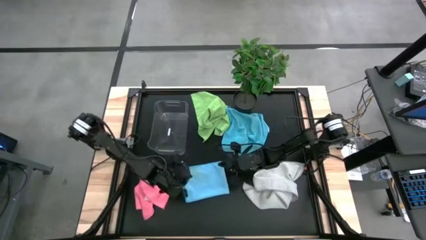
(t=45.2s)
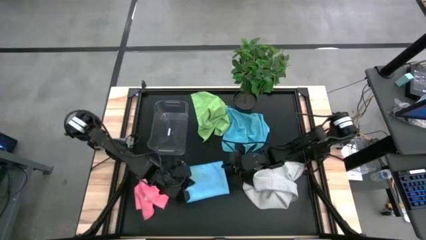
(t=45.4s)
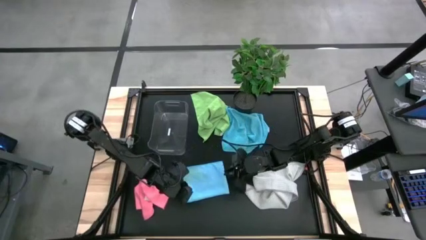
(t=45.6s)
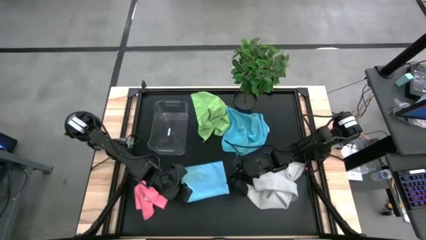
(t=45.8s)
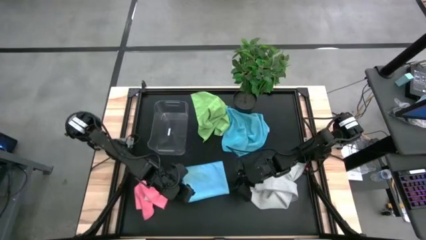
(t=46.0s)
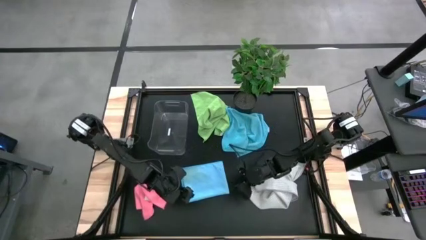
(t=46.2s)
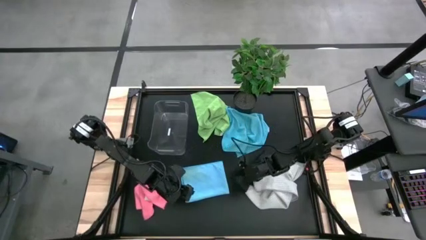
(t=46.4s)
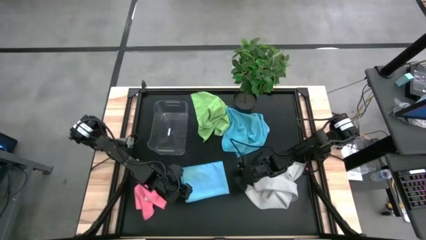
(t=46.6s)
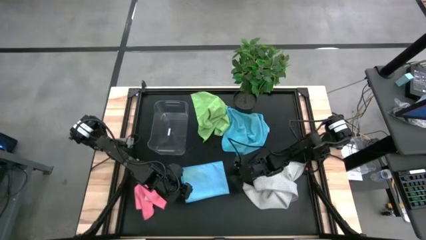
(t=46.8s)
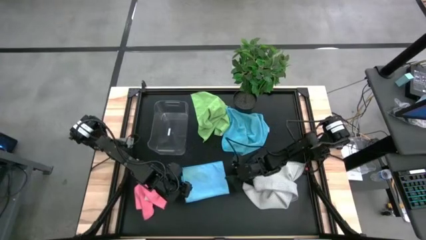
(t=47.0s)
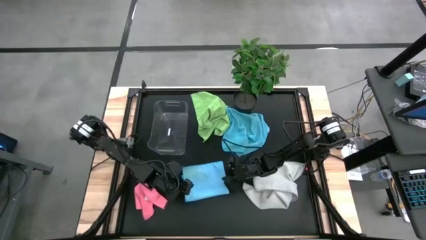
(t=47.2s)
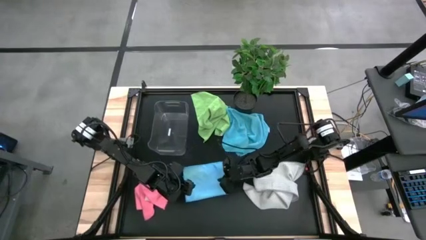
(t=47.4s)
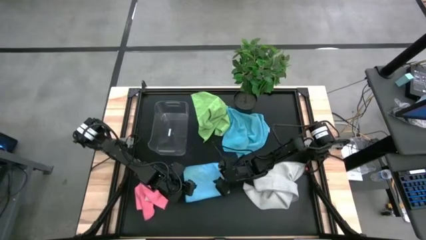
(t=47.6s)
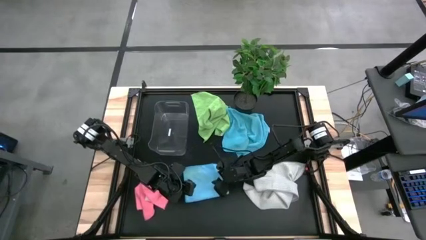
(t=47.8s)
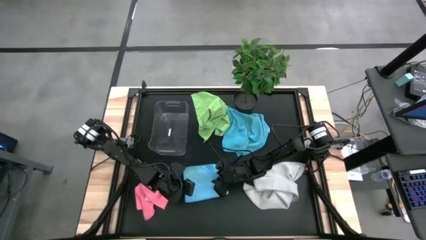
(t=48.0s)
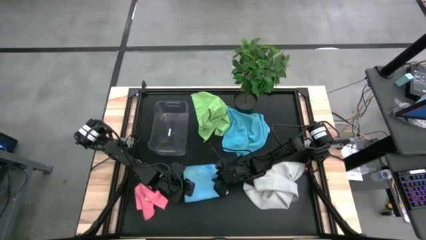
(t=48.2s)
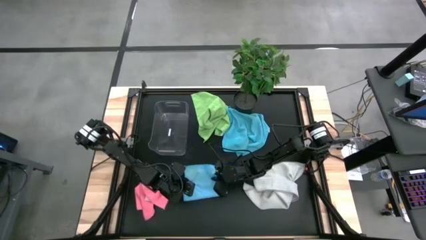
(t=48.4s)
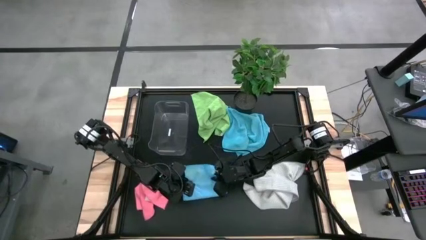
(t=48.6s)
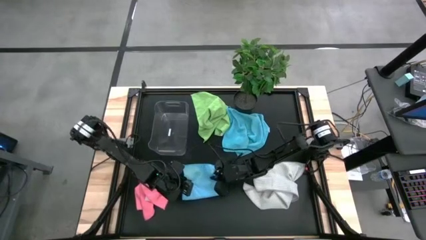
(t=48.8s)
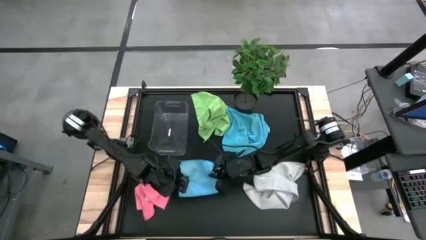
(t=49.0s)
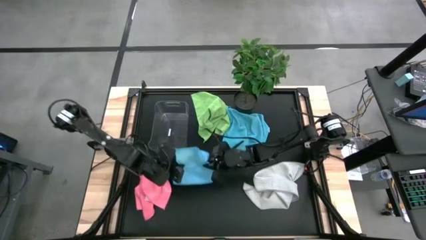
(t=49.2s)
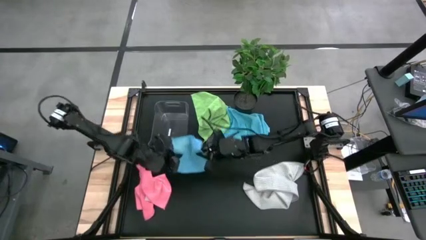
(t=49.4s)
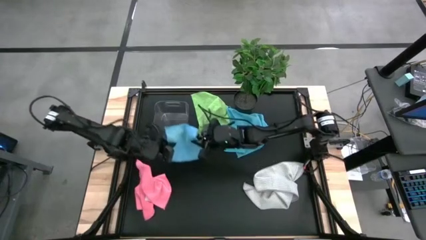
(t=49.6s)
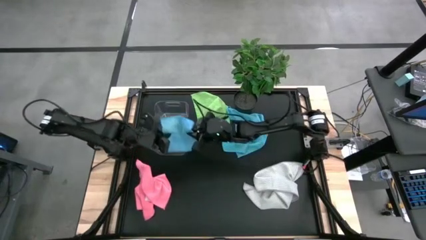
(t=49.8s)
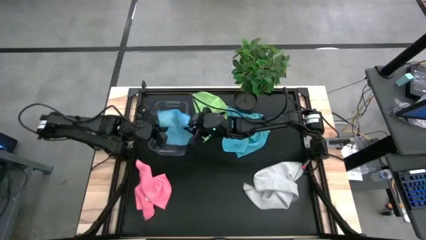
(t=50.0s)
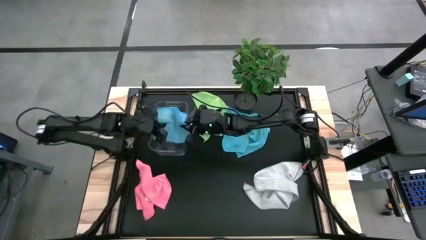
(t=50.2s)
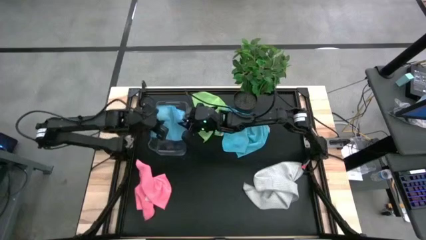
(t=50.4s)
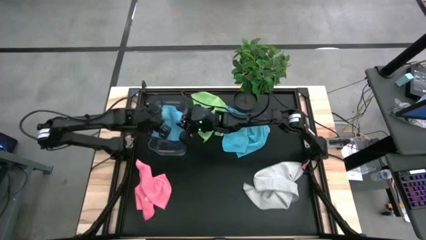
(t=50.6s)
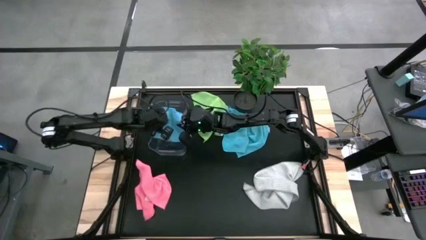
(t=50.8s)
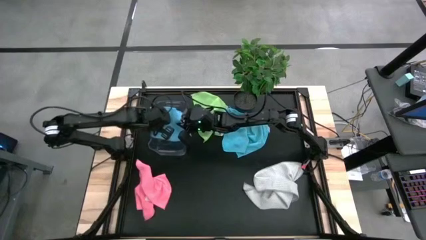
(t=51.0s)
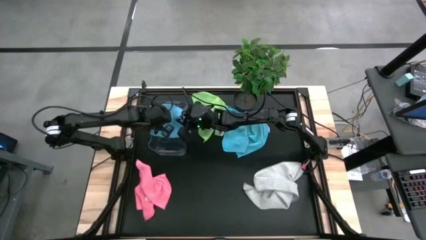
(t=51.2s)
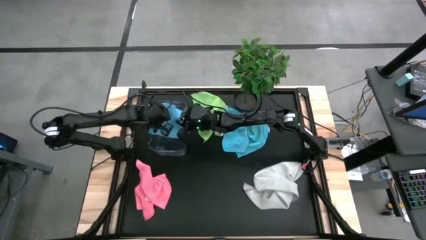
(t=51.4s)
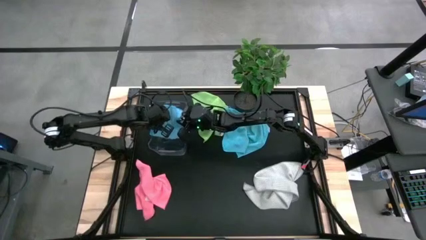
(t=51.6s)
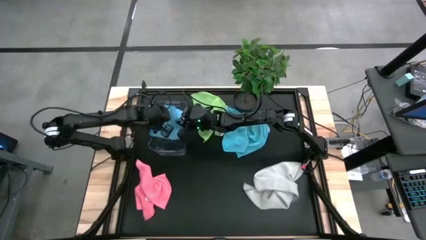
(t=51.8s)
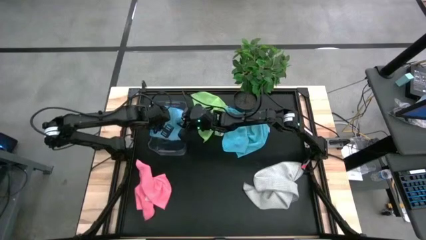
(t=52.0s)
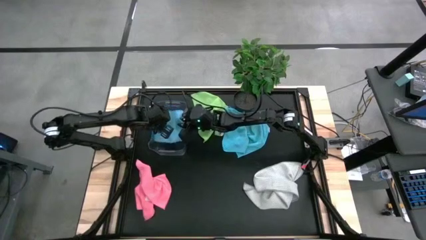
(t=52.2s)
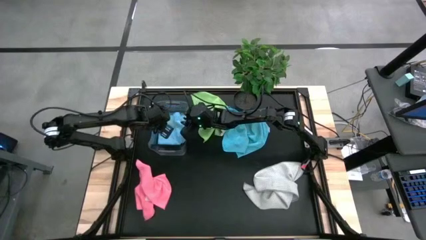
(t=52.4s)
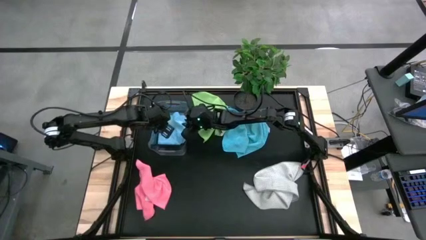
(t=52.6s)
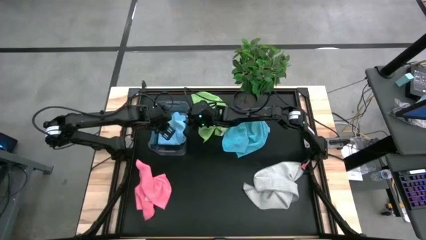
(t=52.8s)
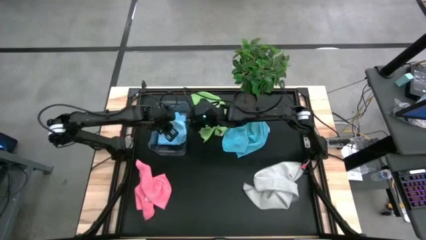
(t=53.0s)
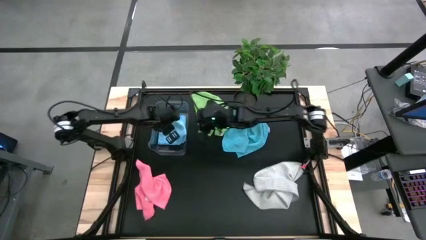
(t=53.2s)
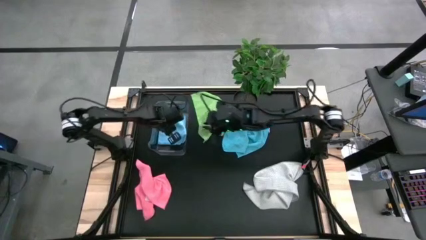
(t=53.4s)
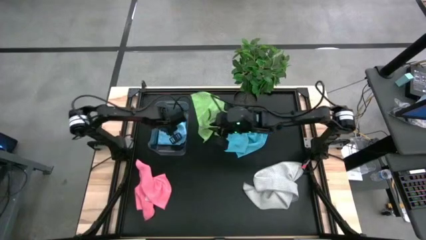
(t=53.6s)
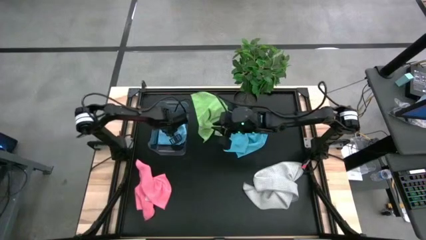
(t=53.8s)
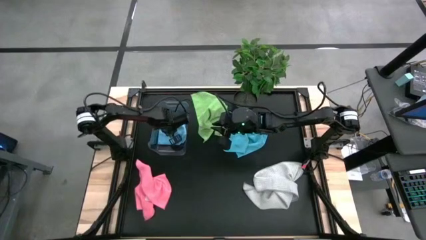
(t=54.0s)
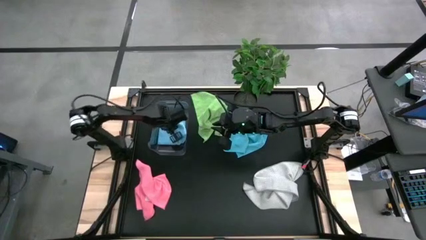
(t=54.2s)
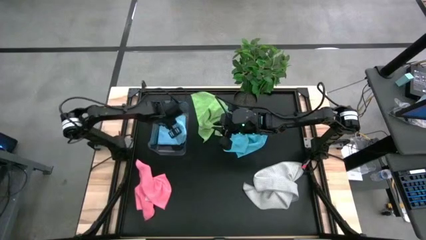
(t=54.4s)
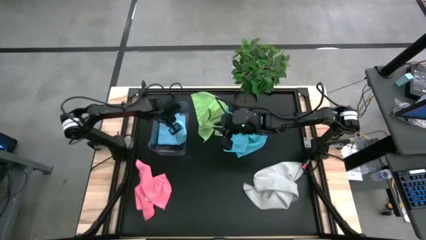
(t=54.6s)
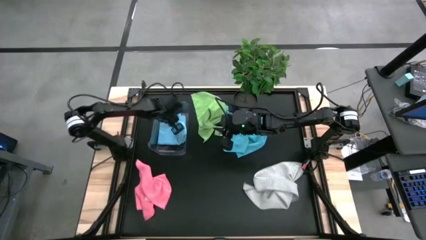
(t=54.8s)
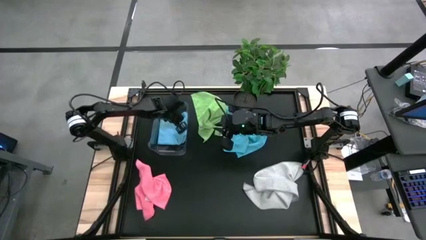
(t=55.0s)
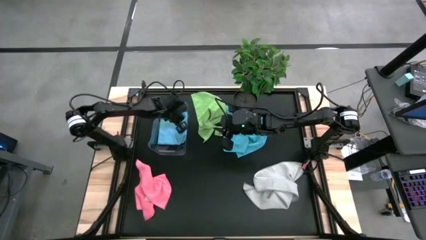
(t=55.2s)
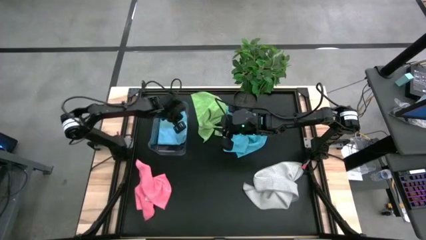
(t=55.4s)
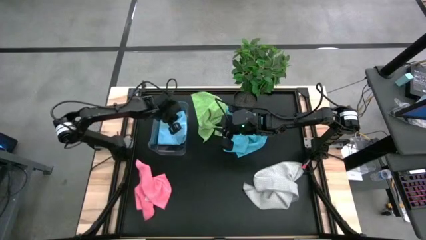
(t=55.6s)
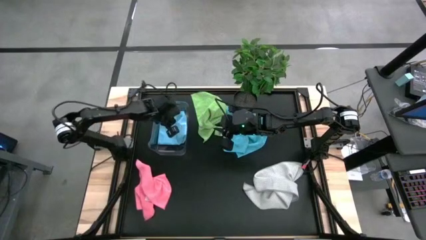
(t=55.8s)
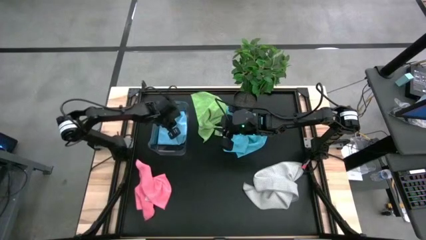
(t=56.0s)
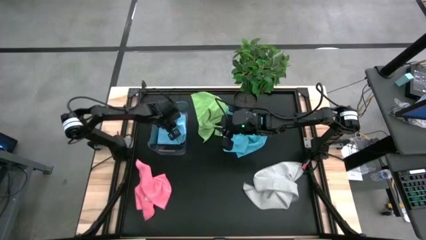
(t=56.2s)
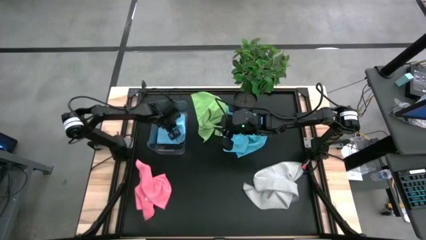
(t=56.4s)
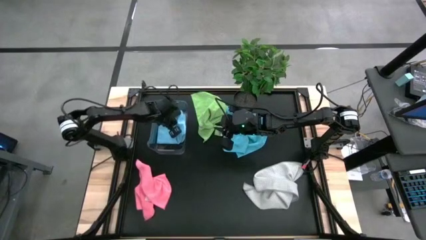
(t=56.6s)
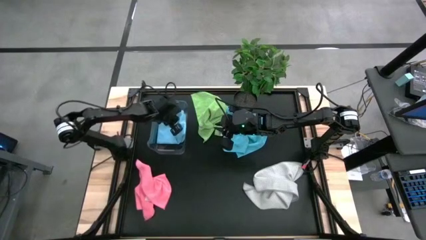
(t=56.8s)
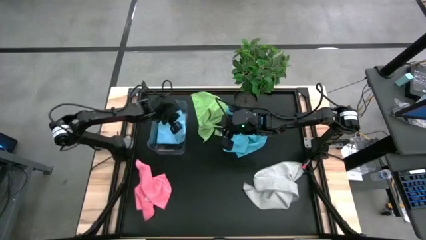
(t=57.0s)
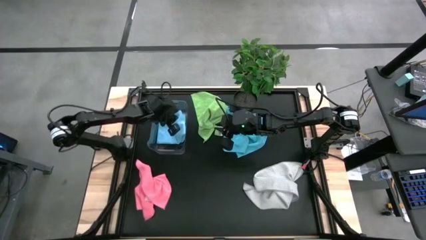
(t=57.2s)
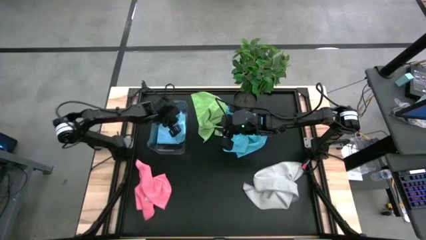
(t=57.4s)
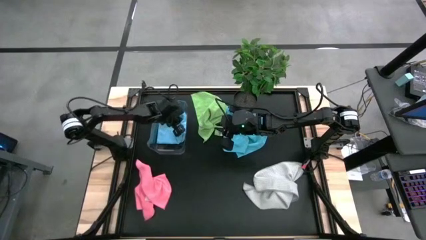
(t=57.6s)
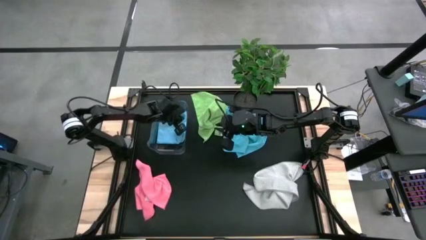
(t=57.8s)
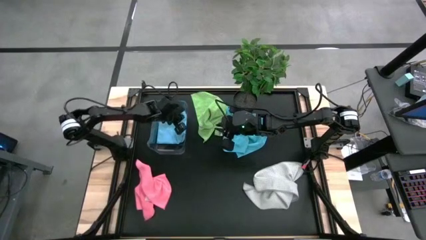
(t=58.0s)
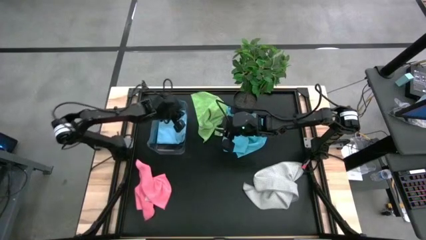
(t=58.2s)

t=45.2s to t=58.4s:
Task: Fold microfiber towels
Put the folded blue microfiber towel into the bin
